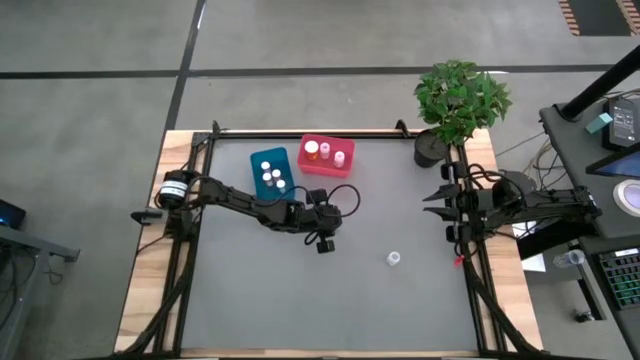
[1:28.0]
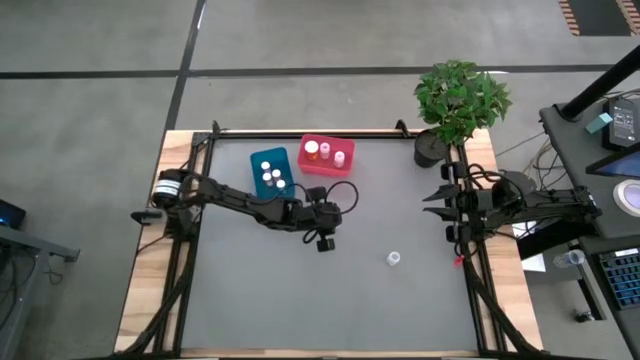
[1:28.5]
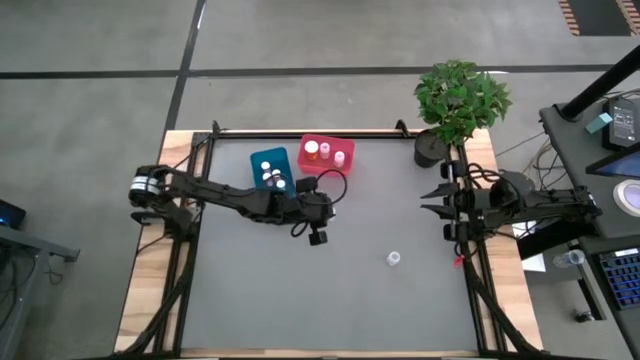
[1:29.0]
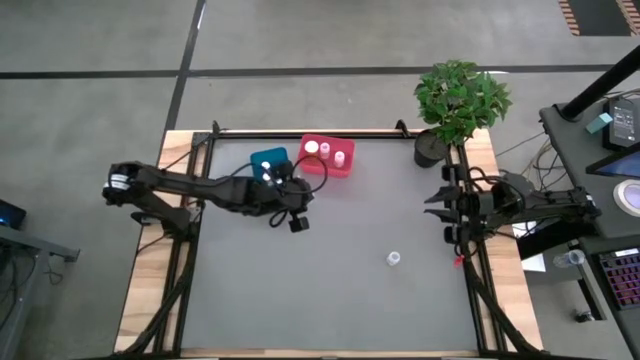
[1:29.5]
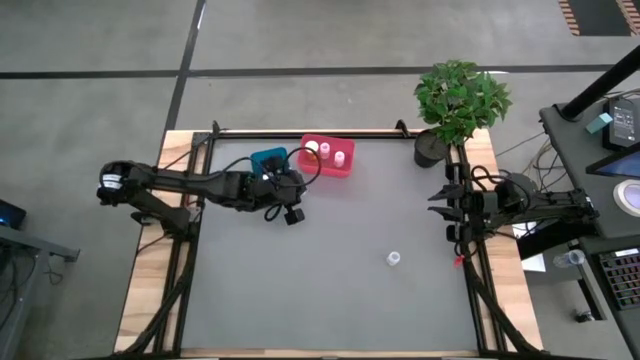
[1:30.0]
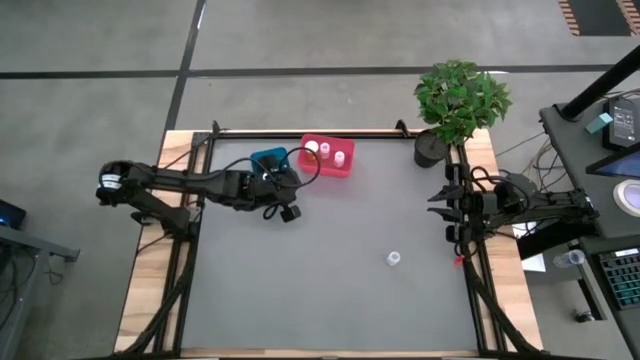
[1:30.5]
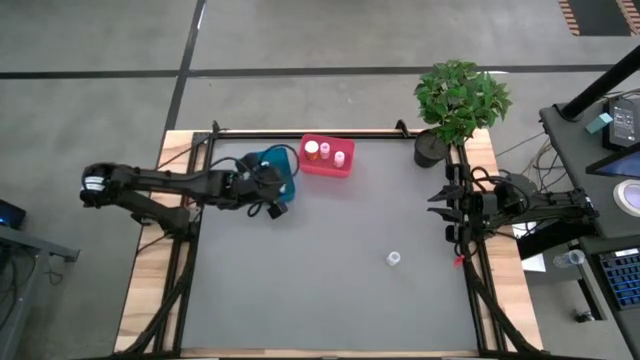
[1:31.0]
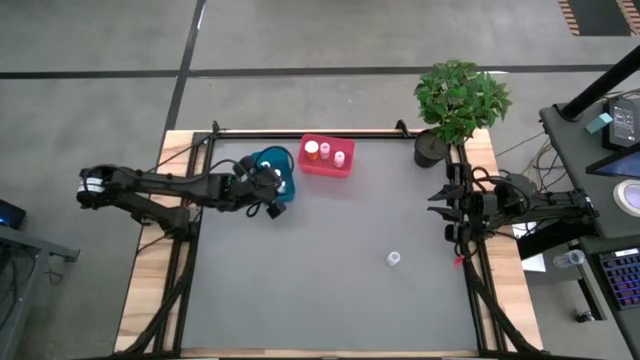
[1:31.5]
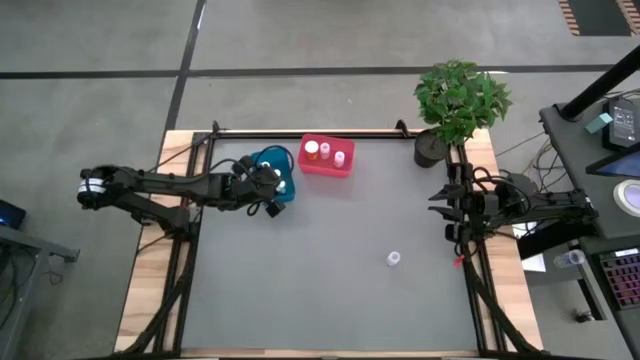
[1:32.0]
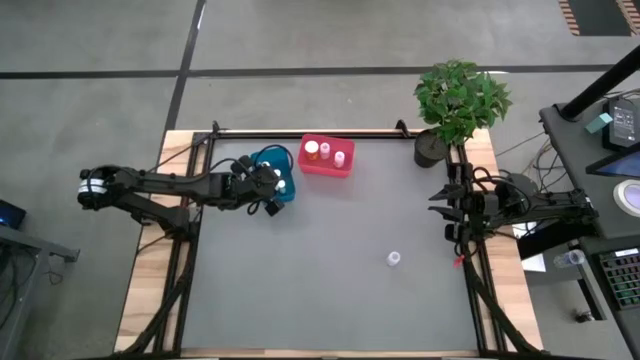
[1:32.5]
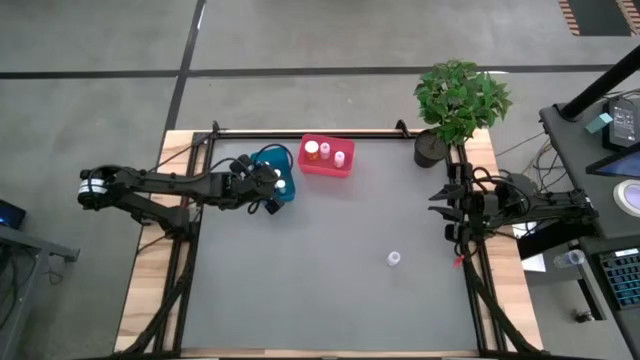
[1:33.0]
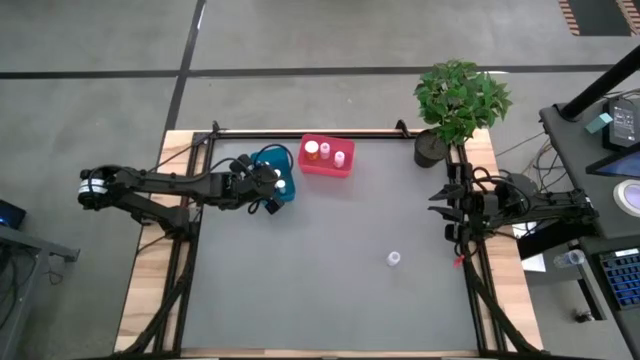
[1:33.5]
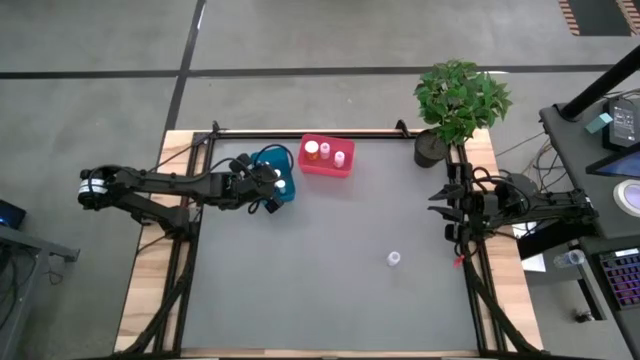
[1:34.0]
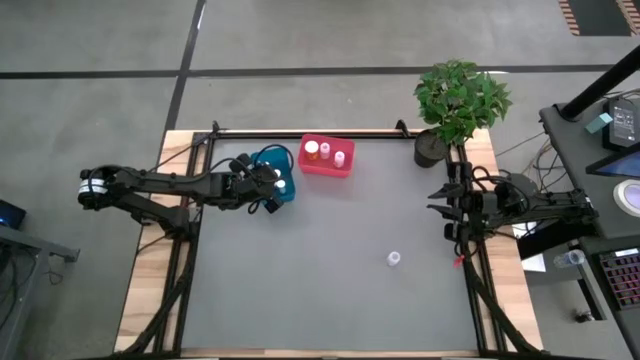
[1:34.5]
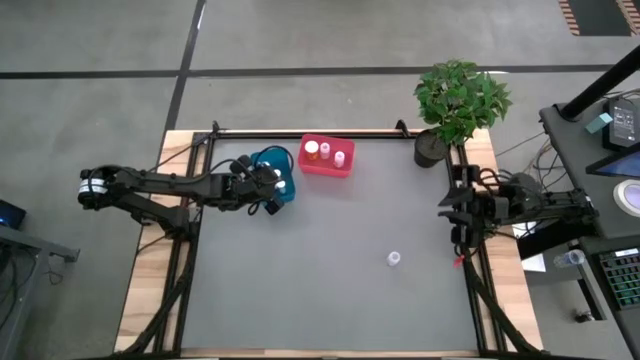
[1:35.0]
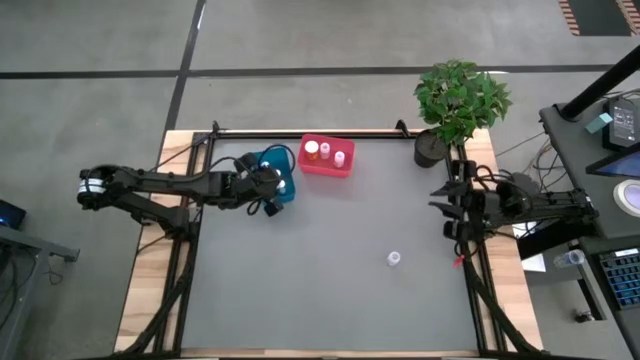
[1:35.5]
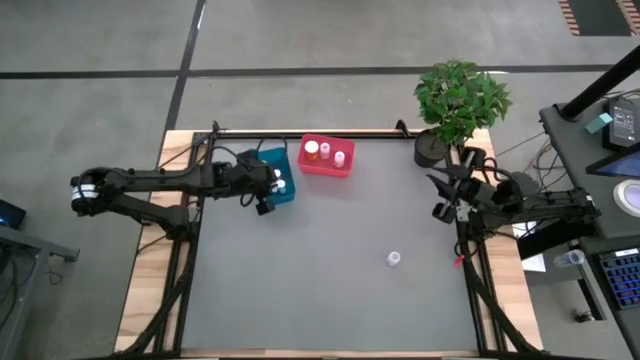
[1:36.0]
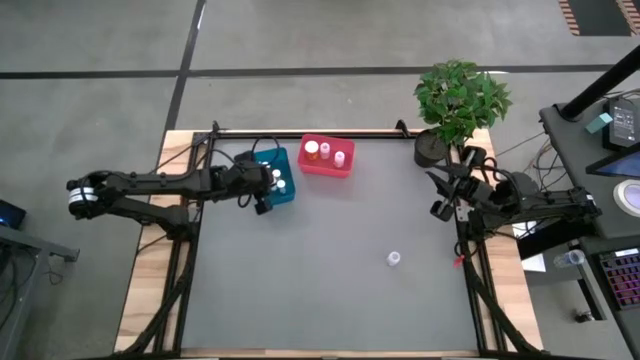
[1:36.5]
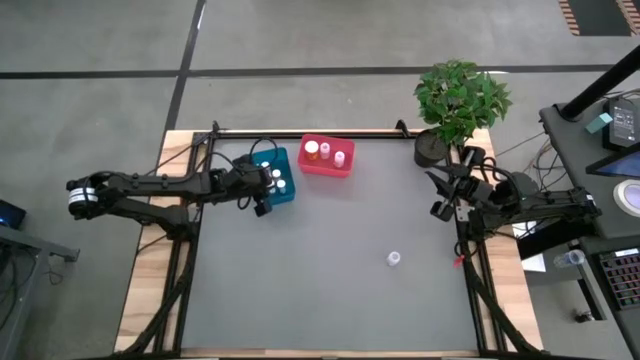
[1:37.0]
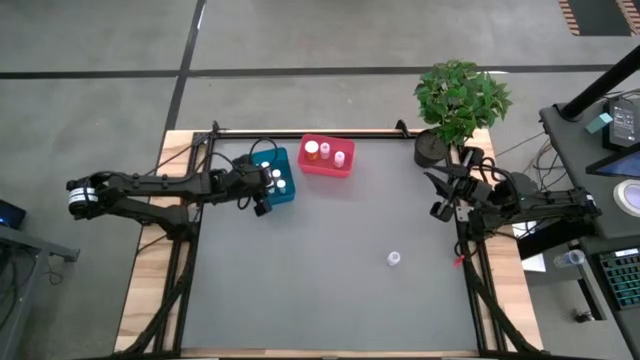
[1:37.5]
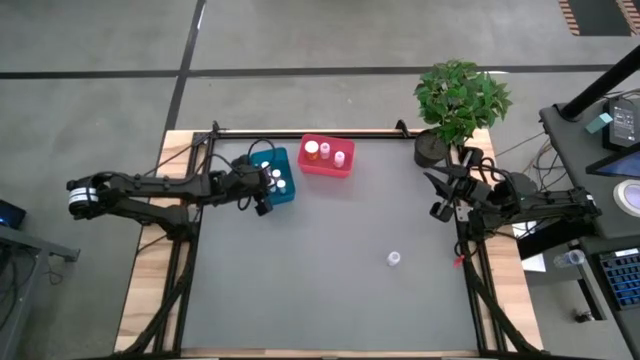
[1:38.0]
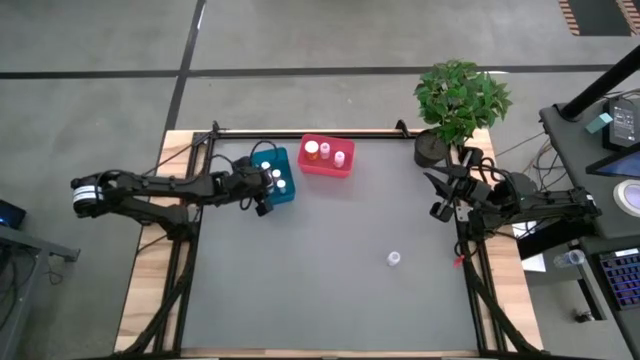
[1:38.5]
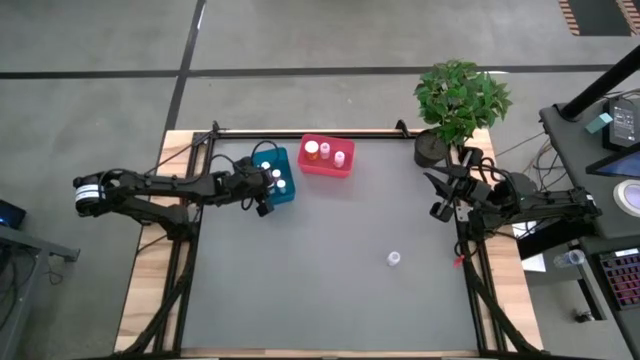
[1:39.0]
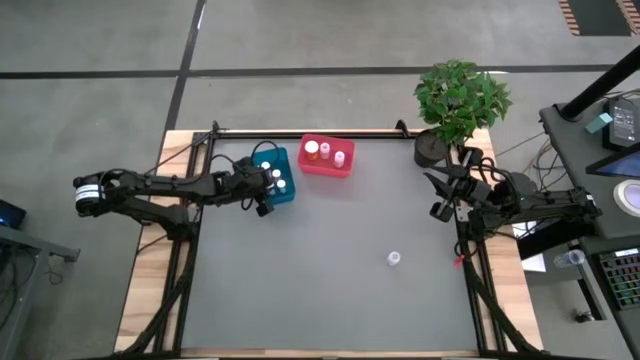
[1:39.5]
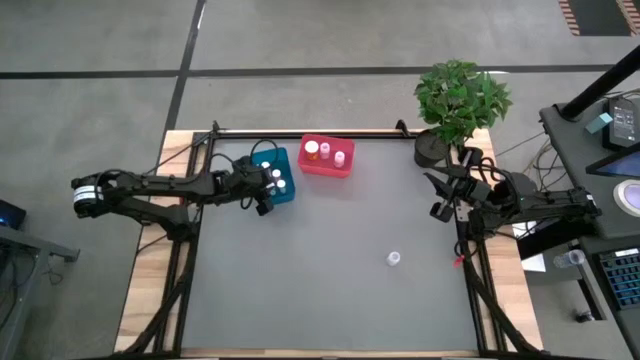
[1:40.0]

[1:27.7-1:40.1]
Task: Pick and place medicine bottles into bin by pill shape (circle, oval)
Put the blue tablet bottle into the blue bin

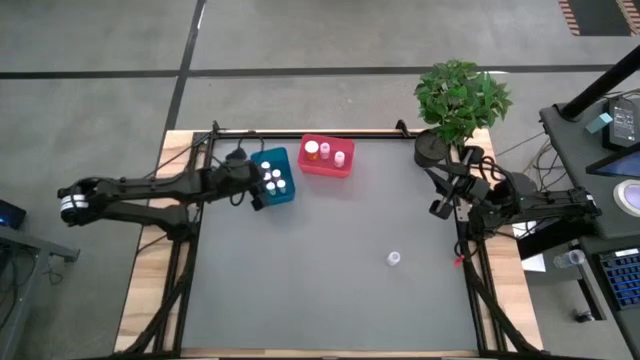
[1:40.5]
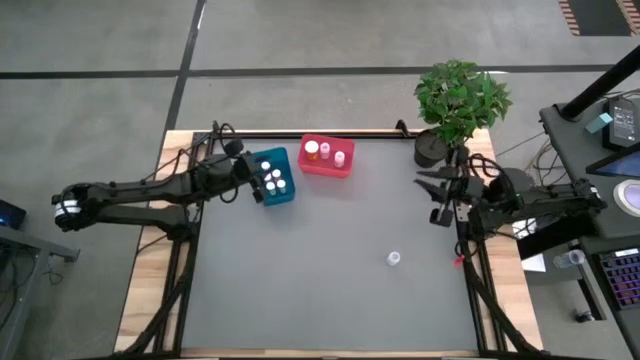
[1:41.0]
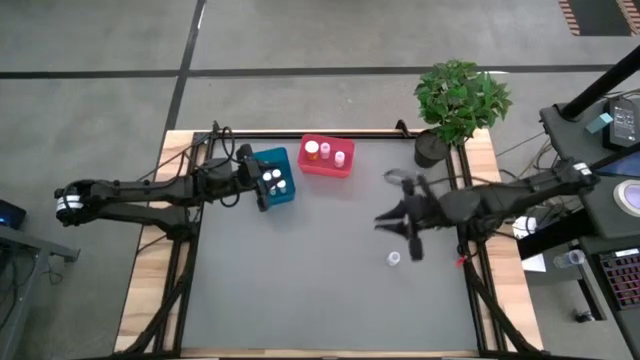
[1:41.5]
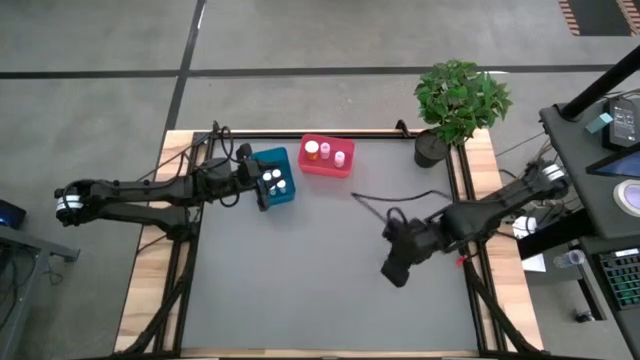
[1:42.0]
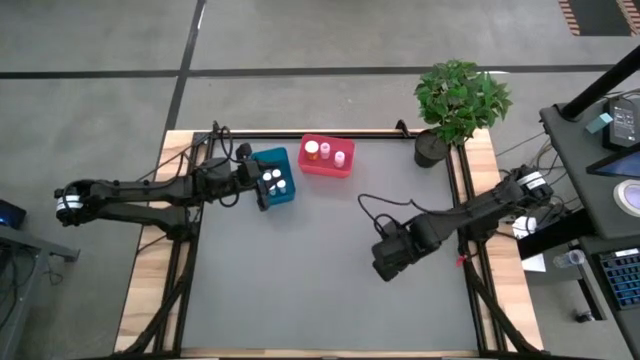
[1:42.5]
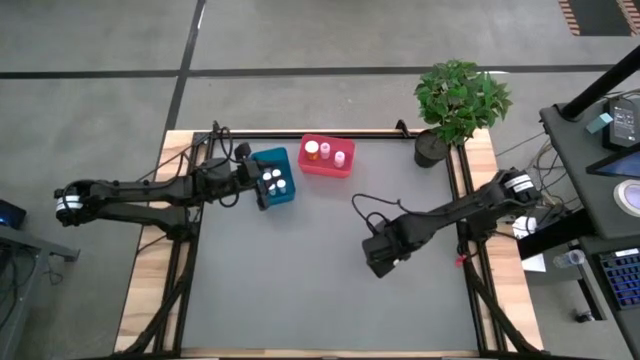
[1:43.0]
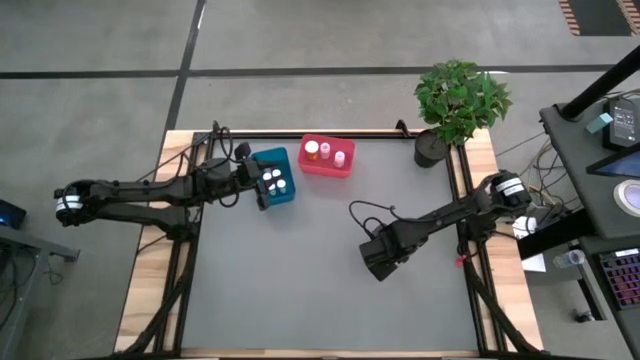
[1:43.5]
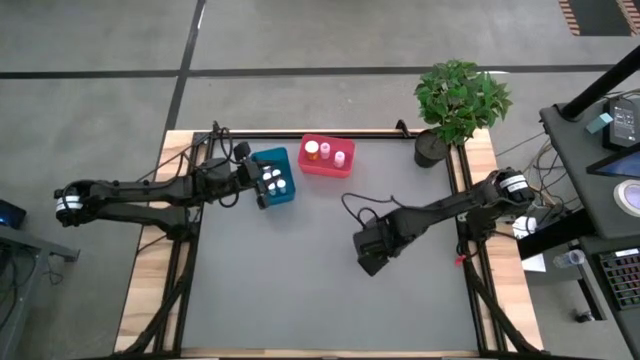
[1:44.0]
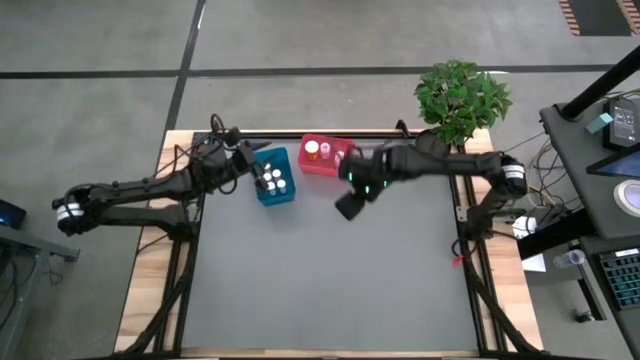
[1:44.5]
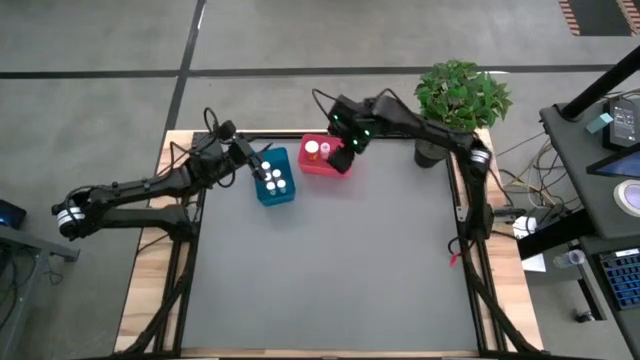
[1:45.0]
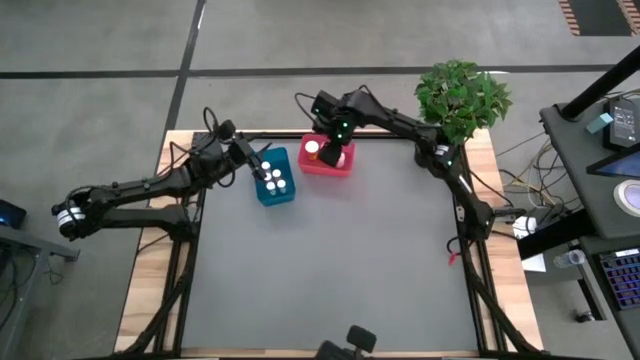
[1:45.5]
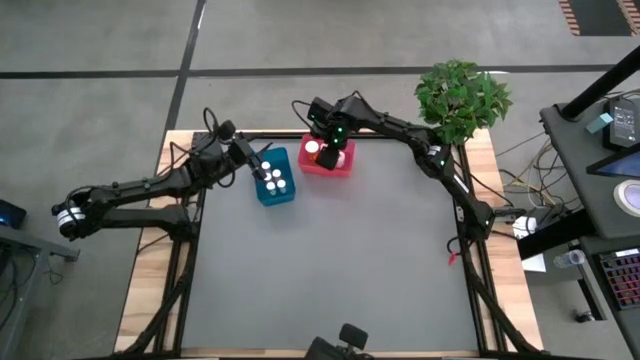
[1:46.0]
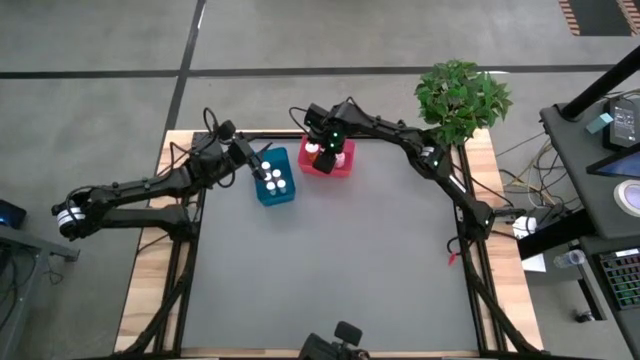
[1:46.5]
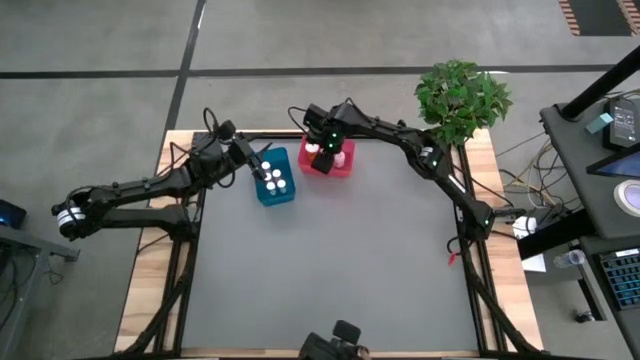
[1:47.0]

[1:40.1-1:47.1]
Put the white capsule bottle into the red bin
